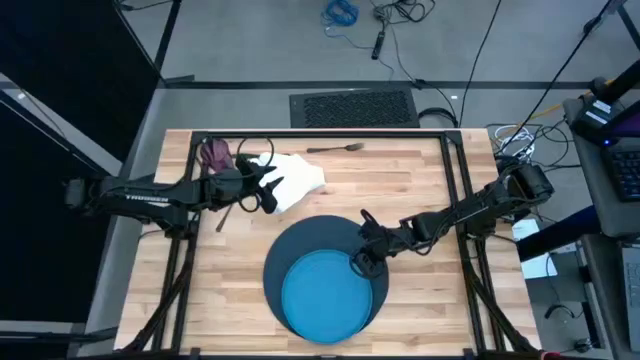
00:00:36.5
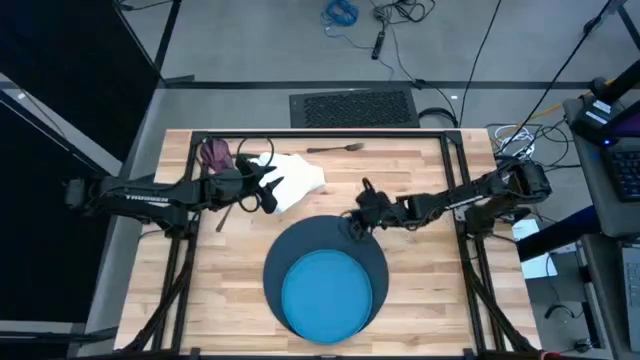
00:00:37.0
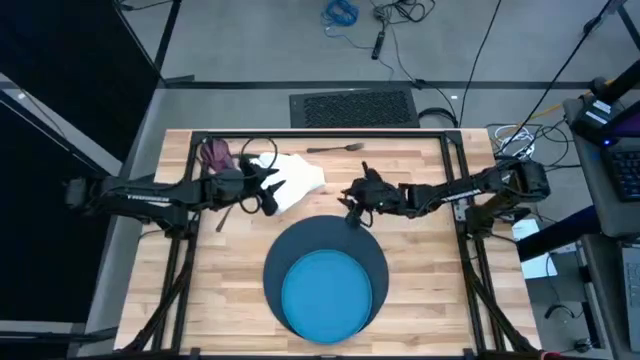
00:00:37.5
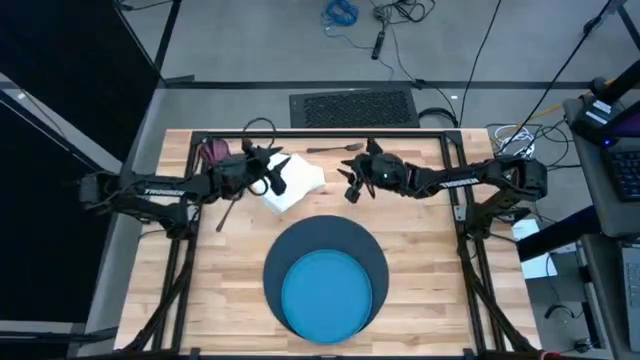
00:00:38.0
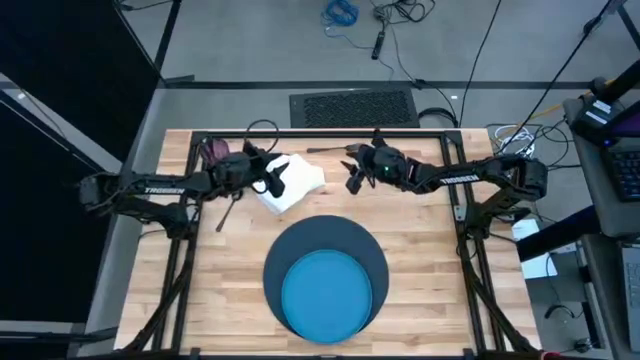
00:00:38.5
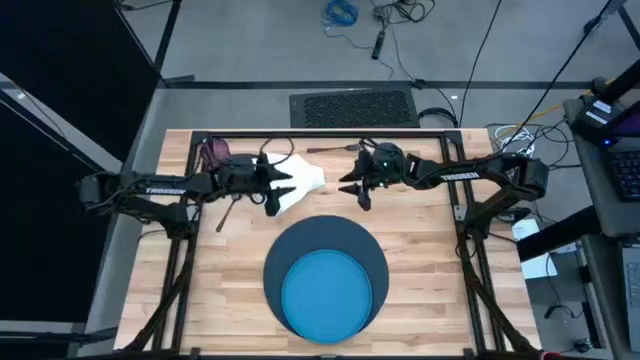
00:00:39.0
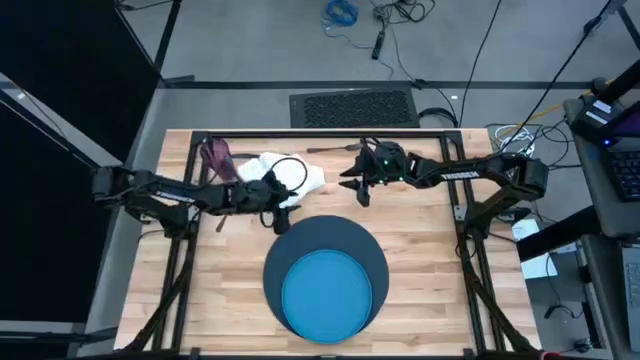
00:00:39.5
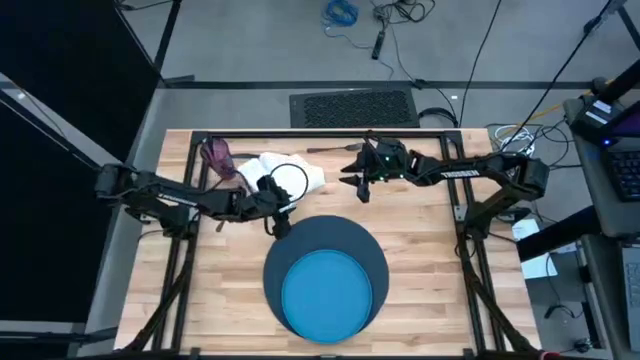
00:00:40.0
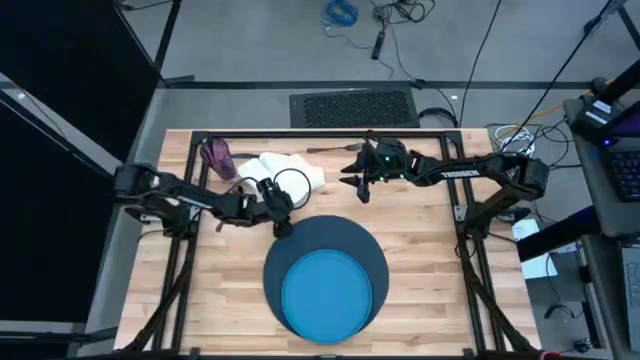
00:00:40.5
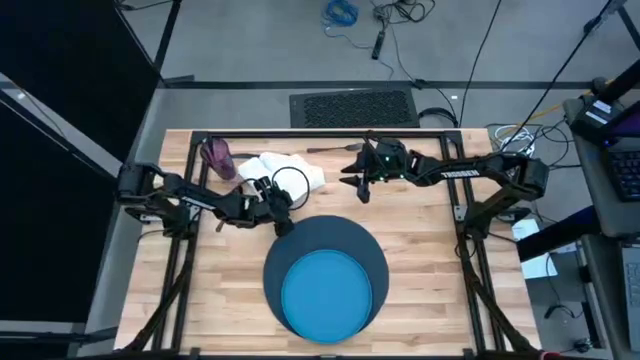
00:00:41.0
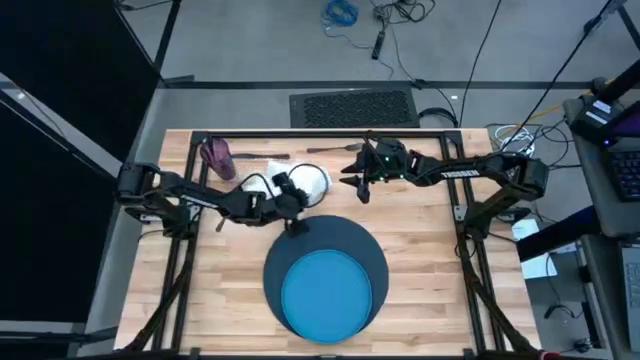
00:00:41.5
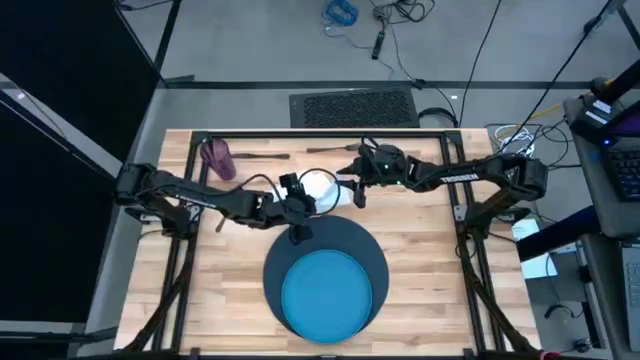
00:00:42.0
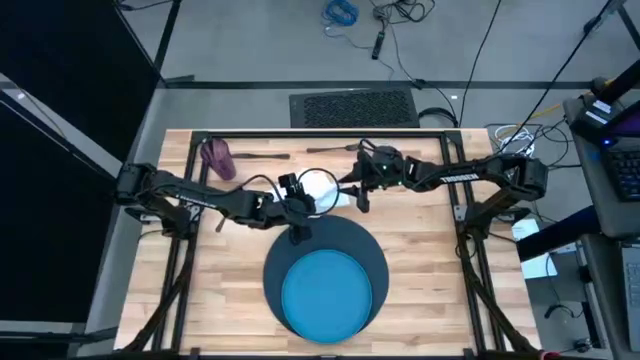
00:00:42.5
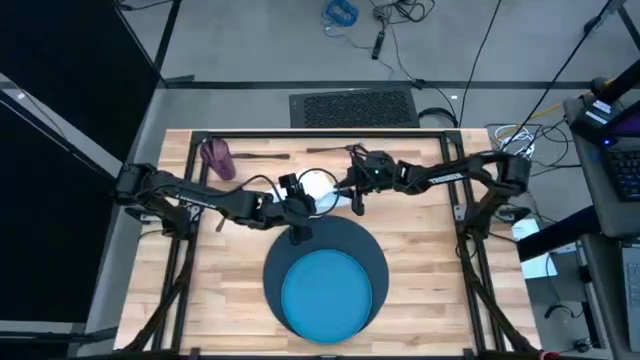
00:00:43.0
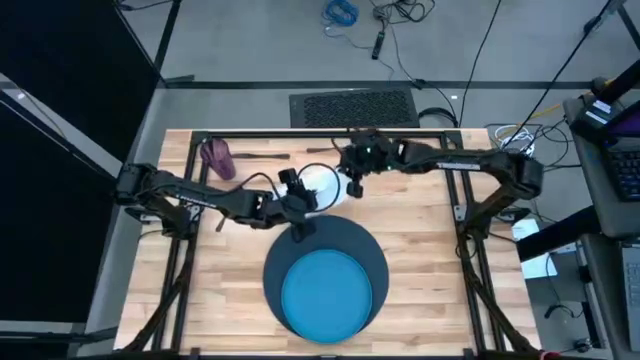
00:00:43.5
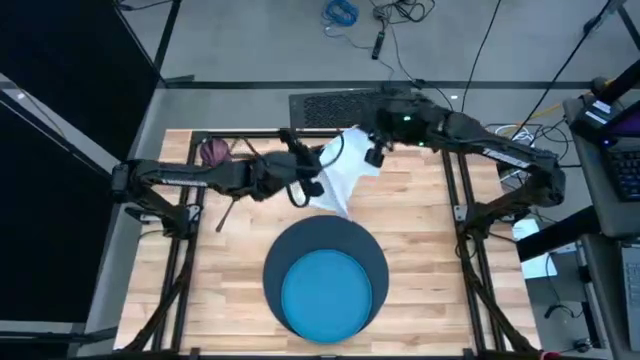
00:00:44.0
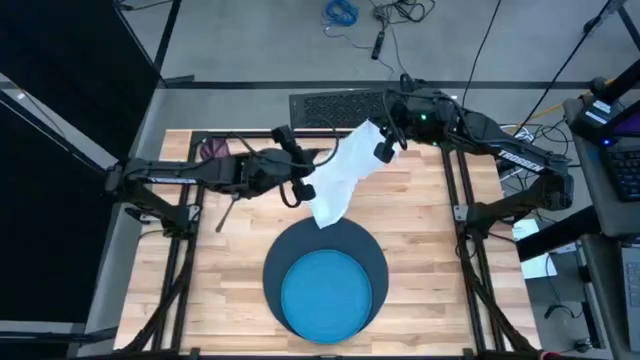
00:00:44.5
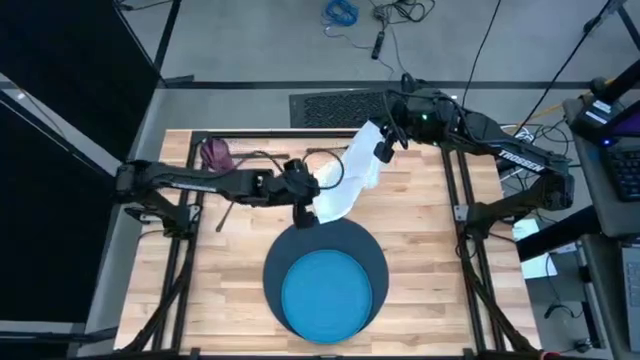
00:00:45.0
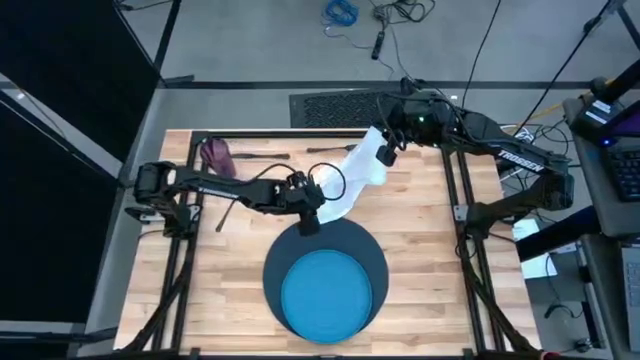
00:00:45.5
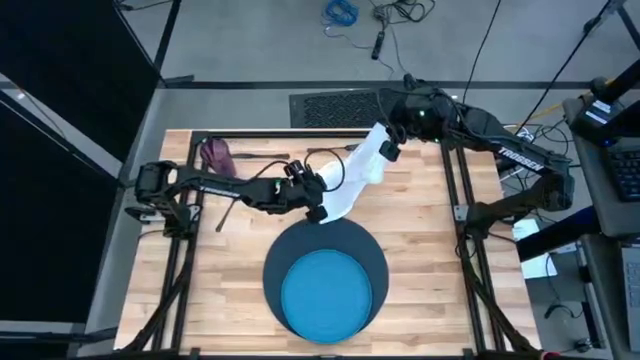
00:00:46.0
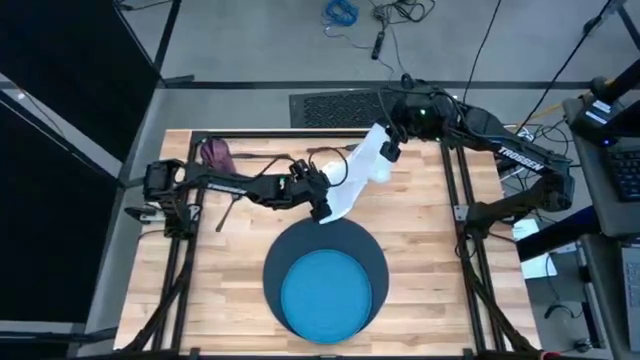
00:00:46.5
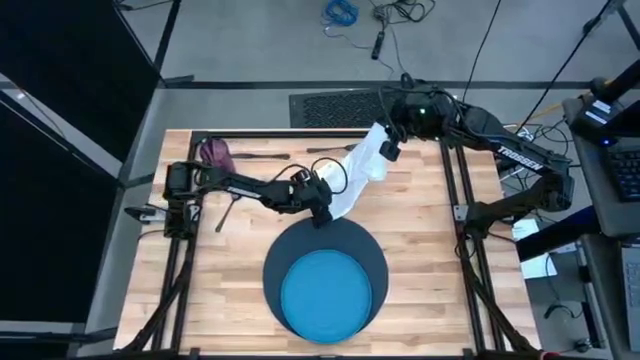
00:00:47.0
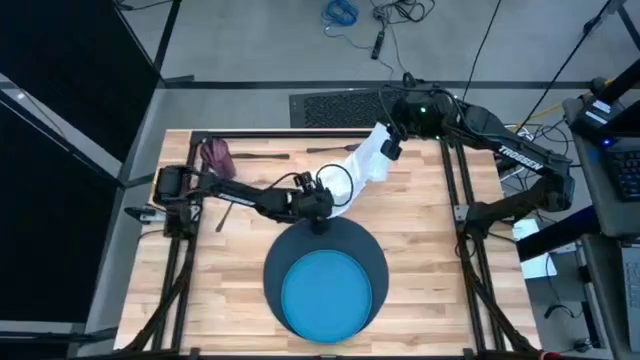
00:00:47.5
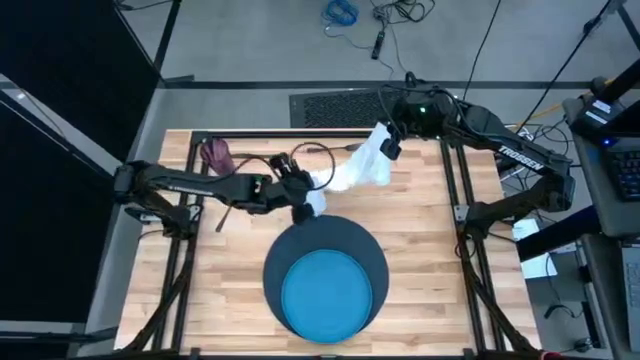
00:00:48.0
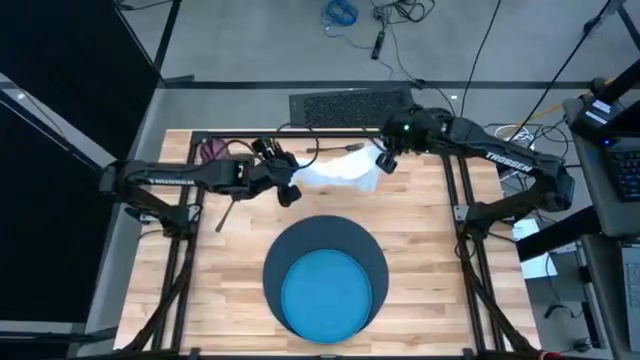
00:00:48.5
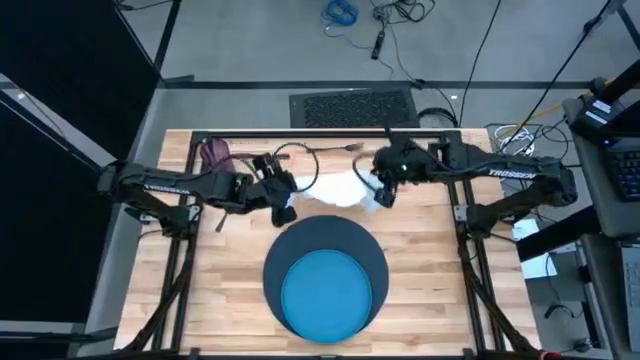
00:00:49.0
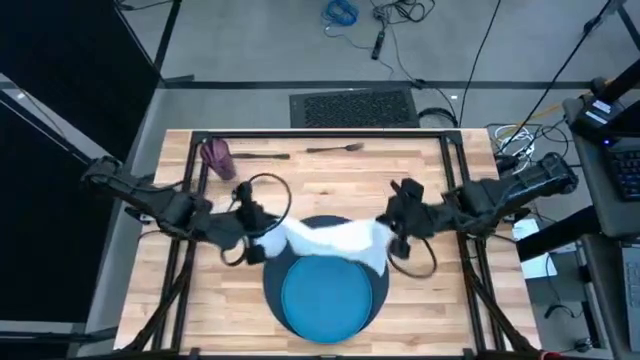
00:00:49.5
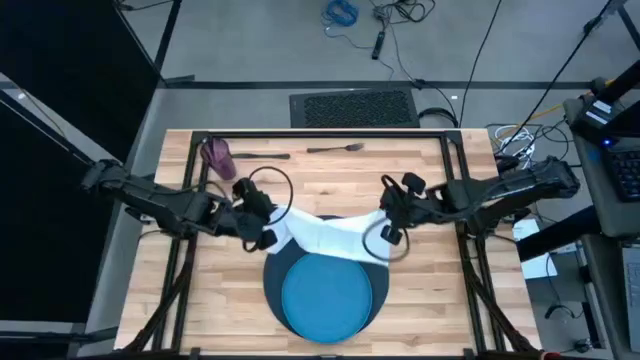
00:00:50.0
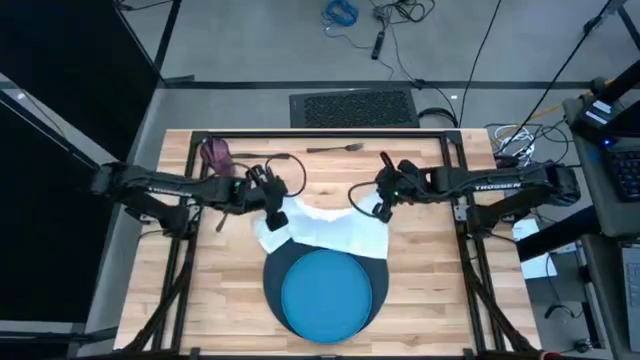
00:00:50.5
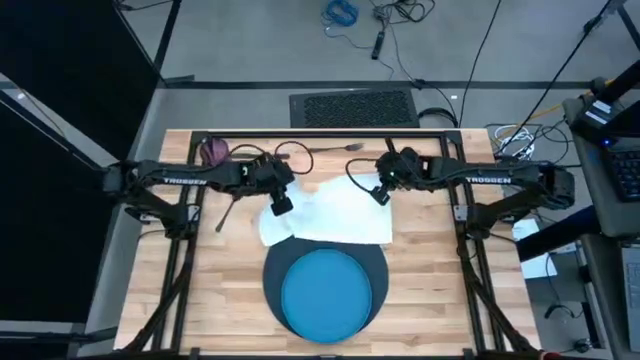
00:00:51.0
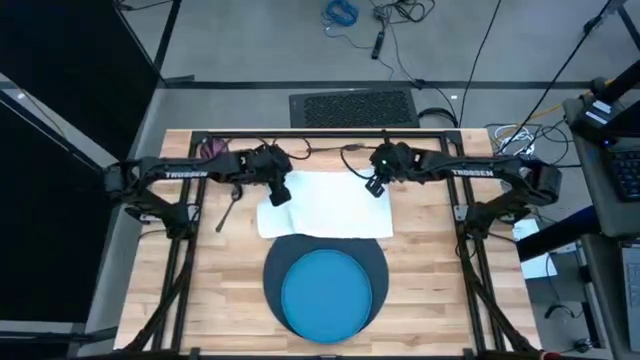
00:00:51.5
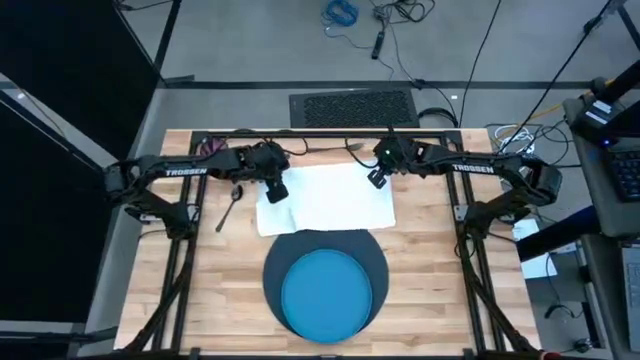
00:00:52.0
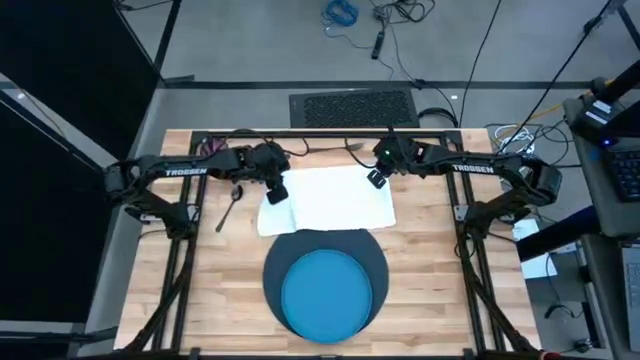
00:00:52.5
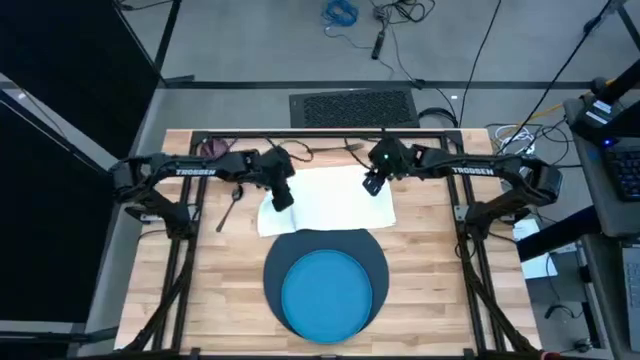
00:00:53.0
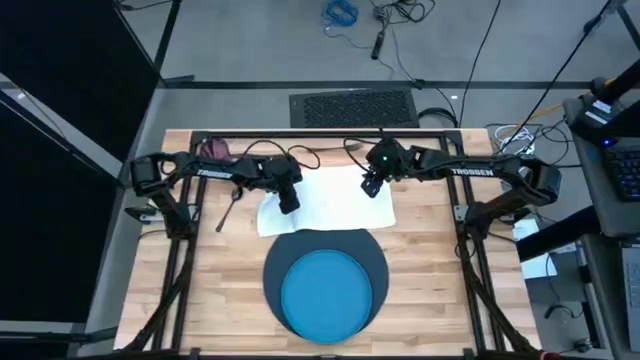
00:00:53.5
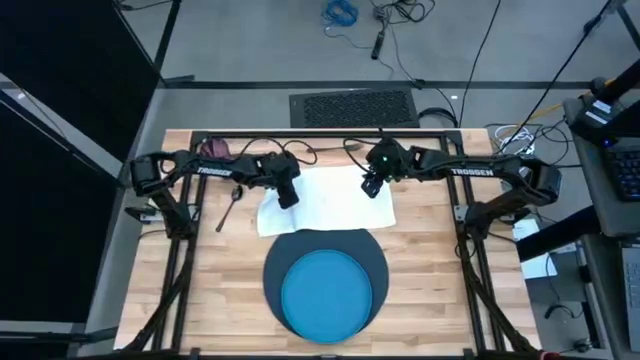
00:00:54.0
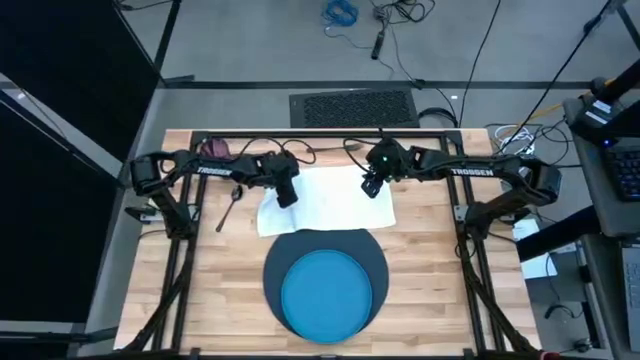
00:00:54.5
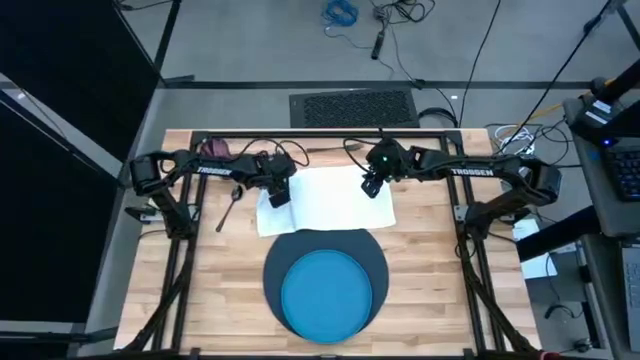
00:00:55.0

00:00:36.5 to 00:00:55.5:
Task: Set table place
Fold the white table napkin

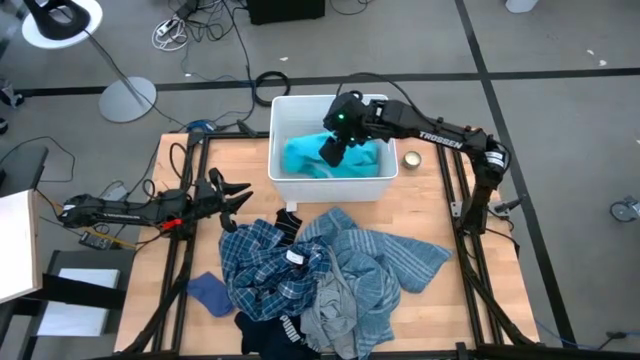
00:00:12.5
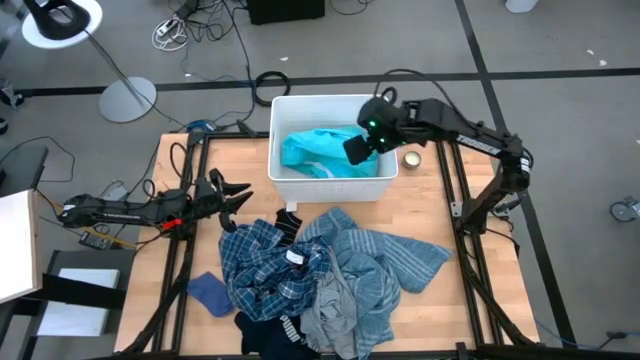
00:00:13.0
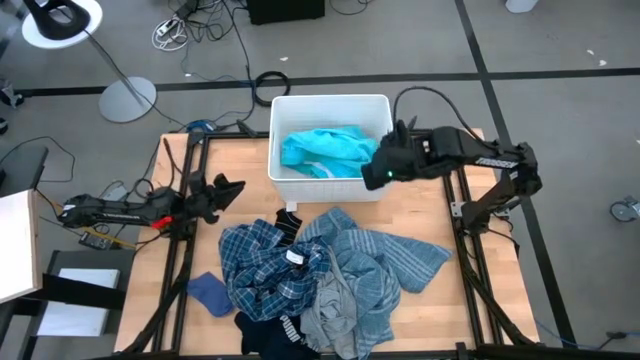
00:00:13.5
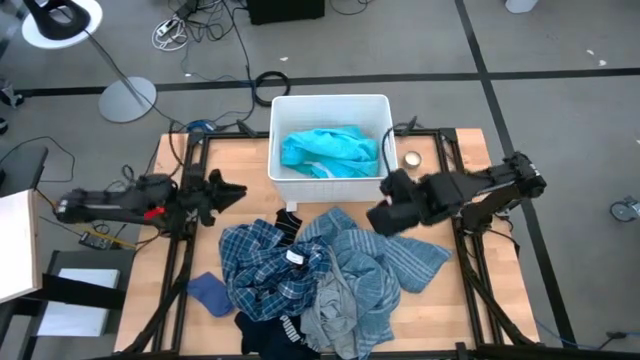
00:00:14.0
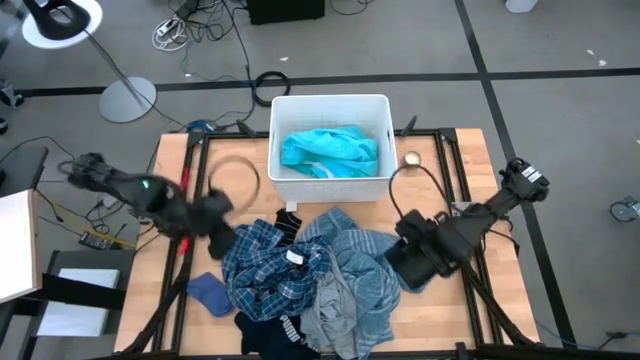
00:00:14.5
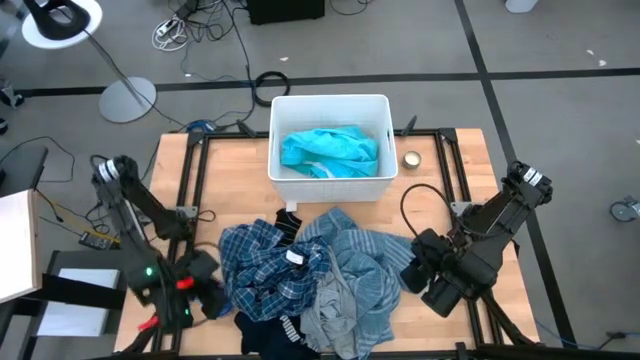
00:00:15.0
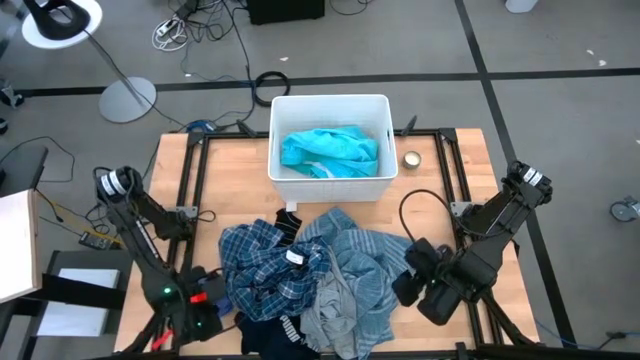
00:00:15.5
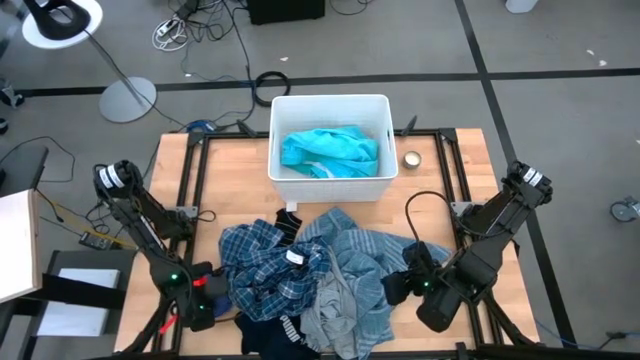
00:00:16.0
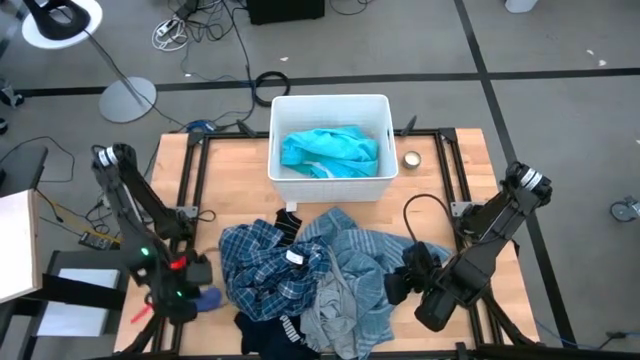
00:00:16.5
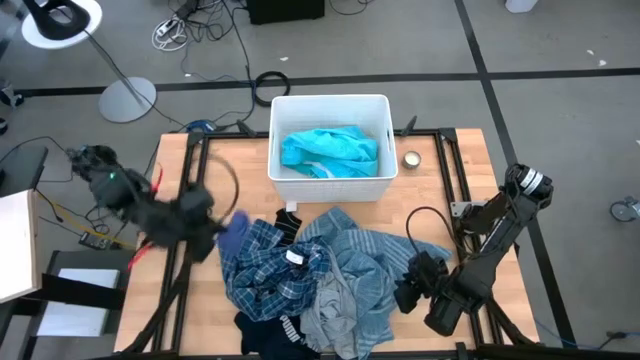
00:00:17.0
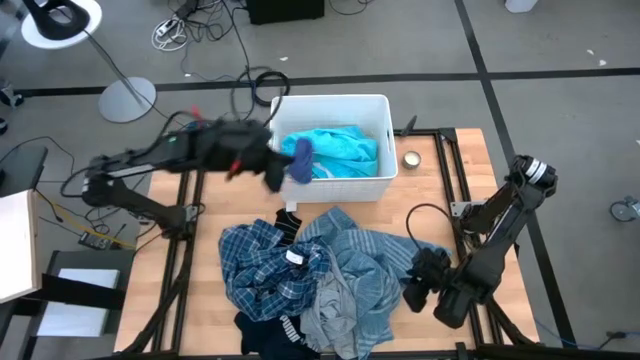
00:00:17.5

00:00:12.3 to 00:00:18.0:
Task: Sort clothes
Put the left blue sock into the laundry bin
